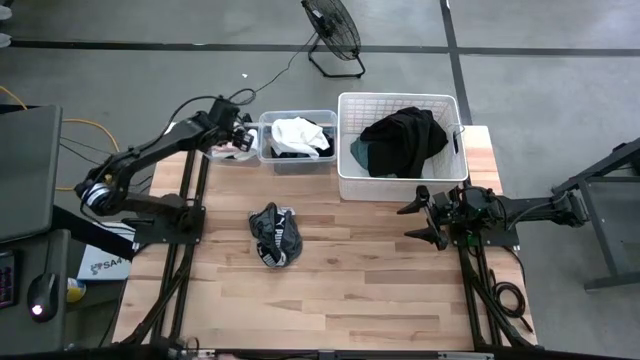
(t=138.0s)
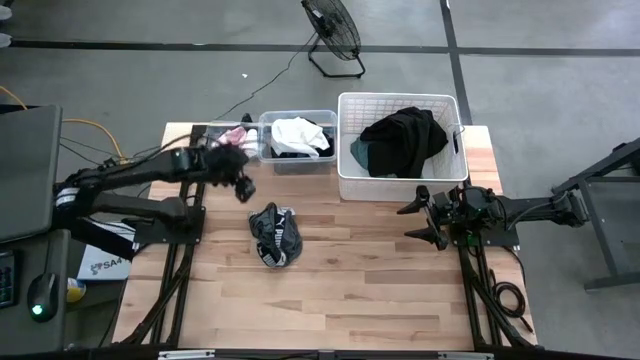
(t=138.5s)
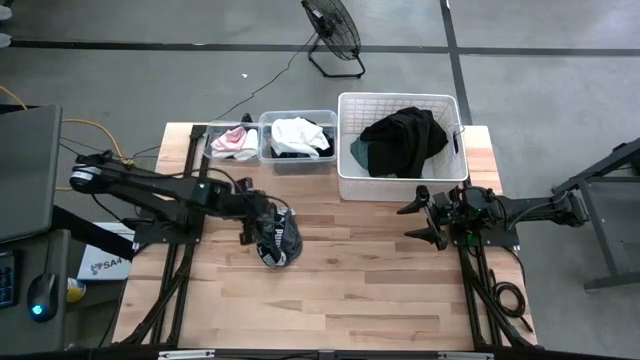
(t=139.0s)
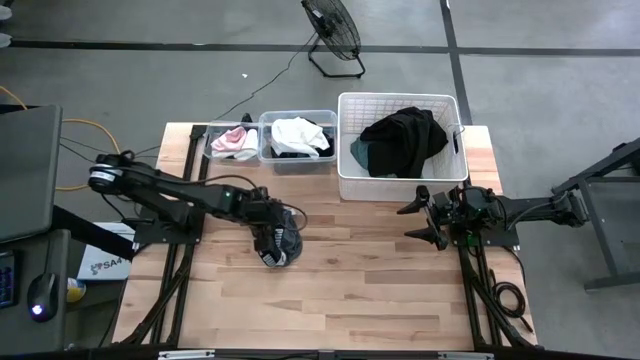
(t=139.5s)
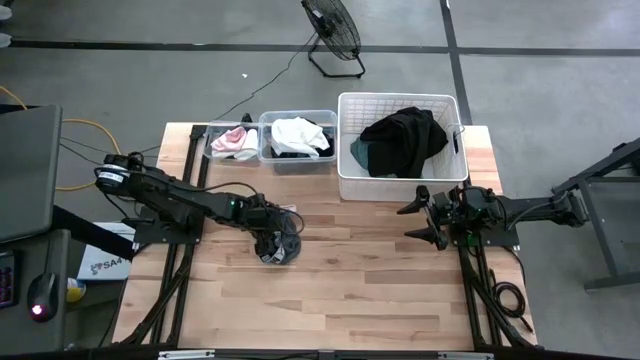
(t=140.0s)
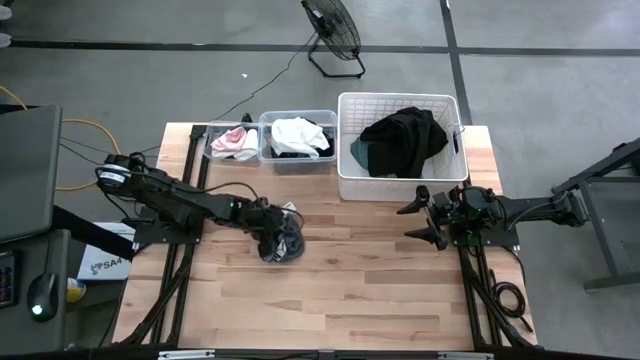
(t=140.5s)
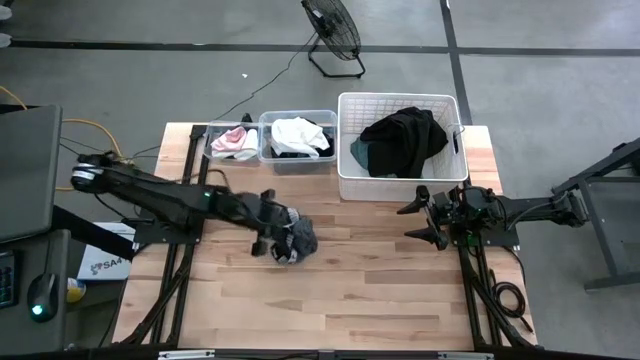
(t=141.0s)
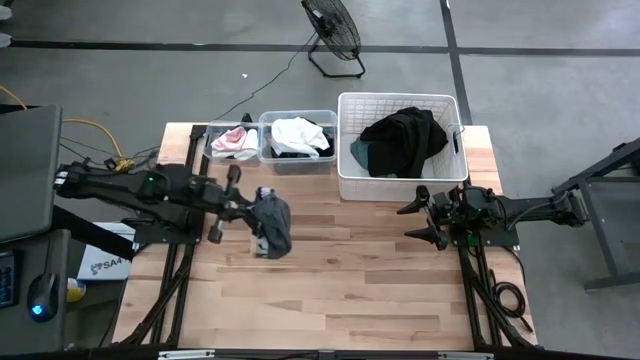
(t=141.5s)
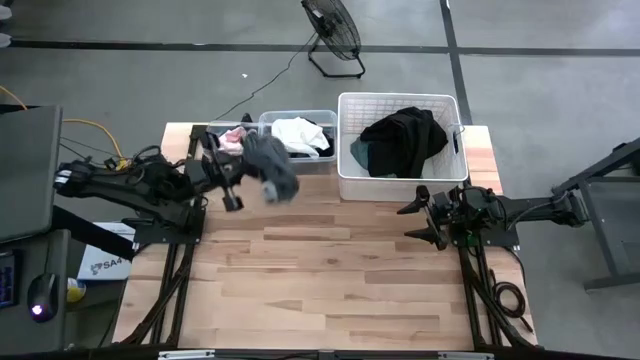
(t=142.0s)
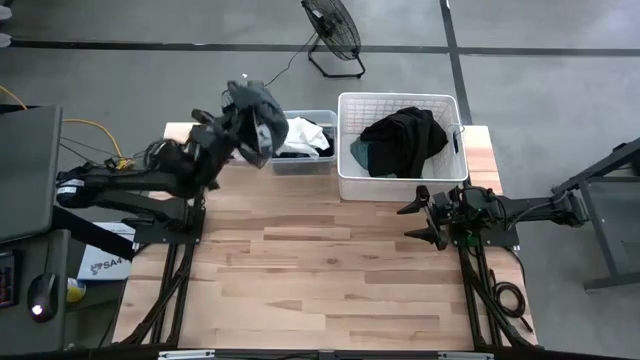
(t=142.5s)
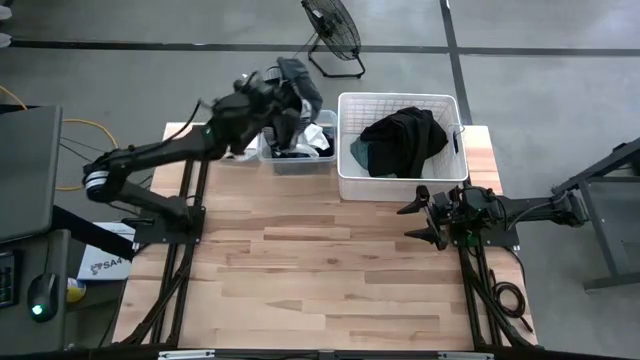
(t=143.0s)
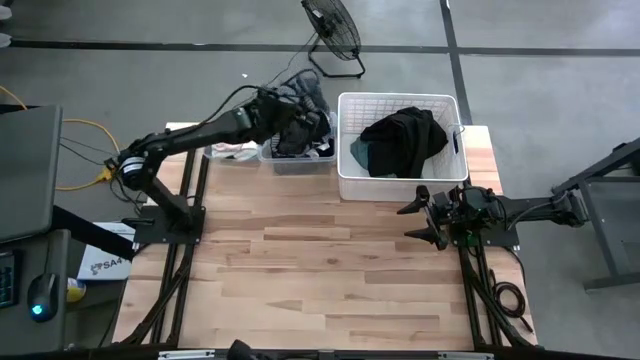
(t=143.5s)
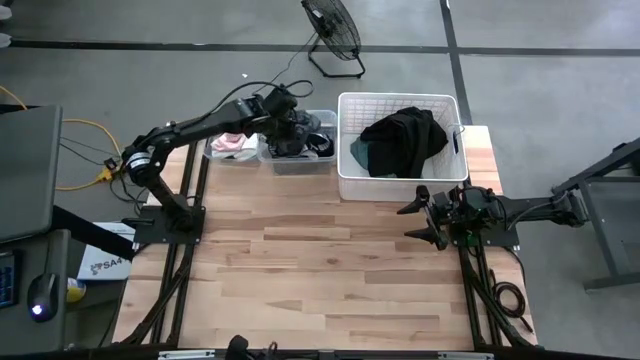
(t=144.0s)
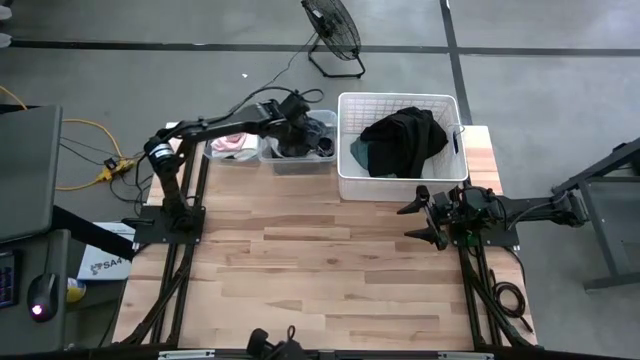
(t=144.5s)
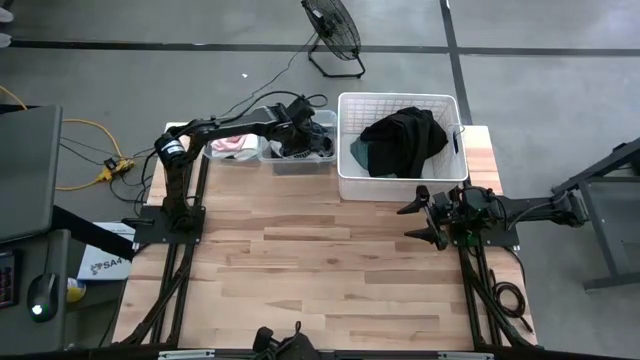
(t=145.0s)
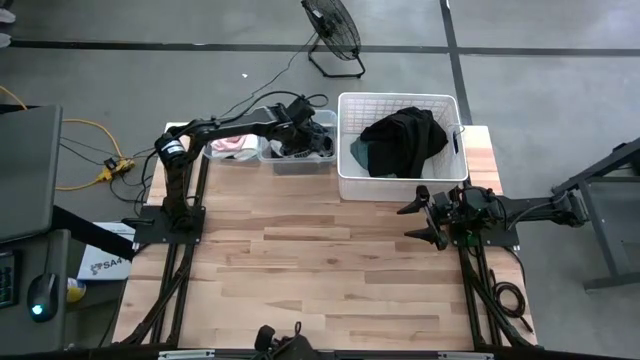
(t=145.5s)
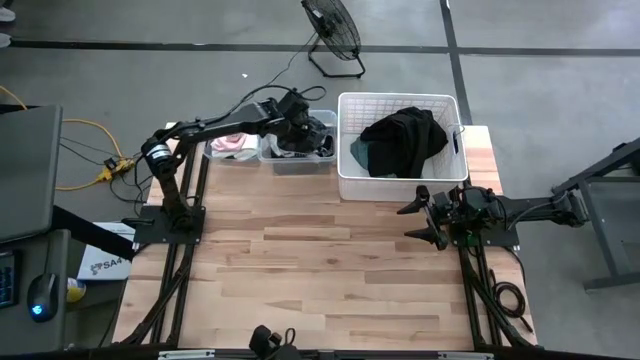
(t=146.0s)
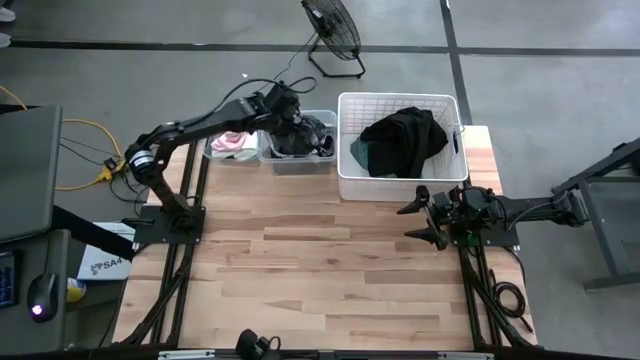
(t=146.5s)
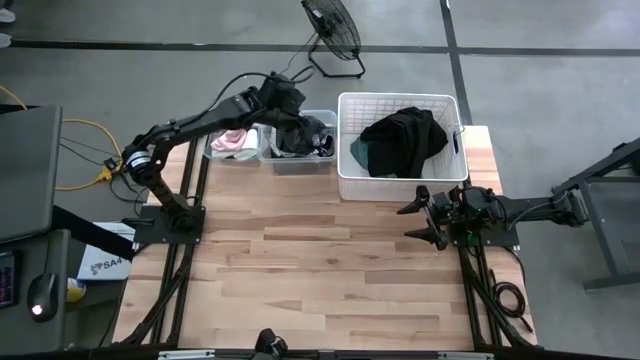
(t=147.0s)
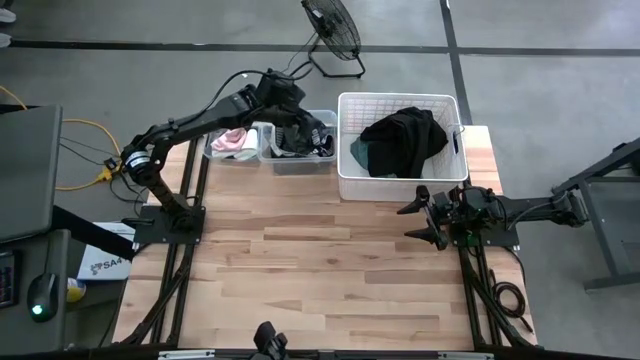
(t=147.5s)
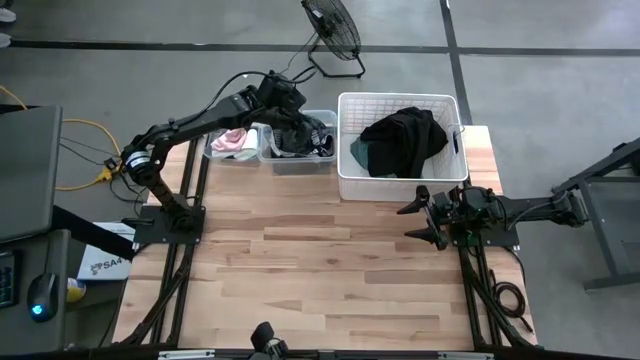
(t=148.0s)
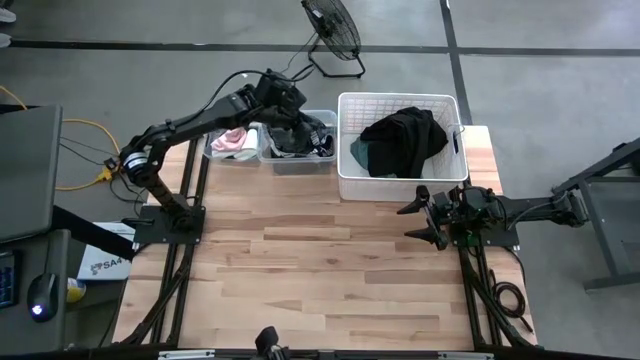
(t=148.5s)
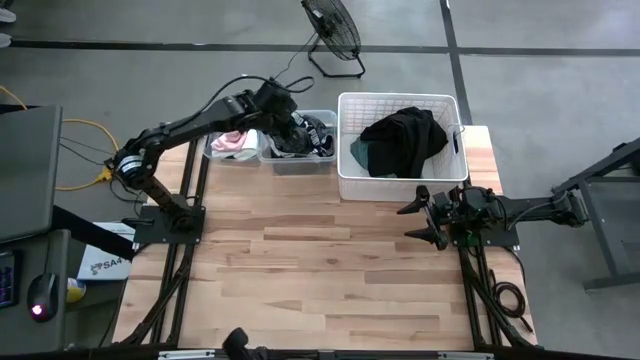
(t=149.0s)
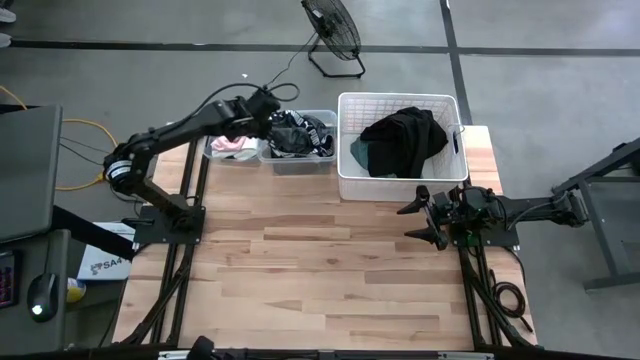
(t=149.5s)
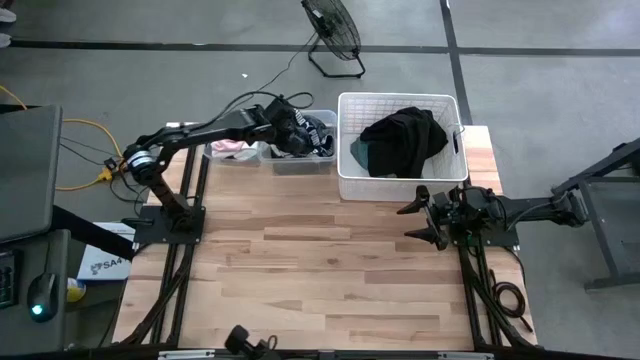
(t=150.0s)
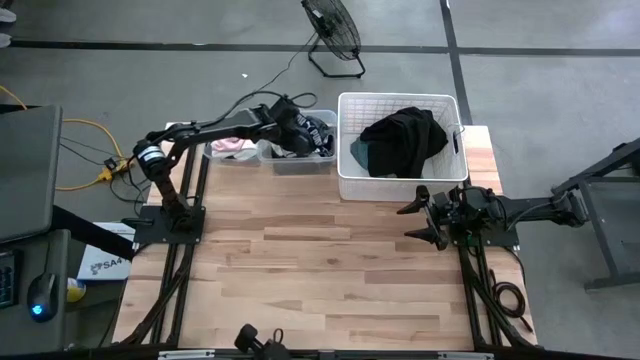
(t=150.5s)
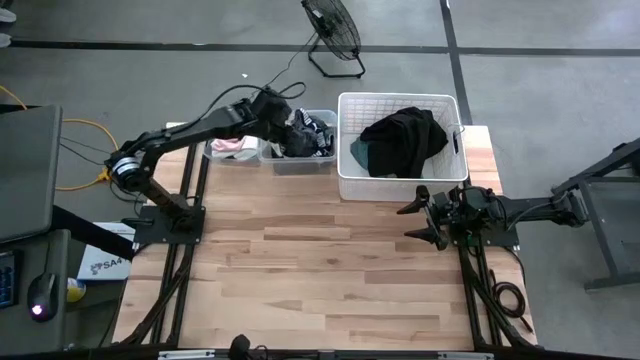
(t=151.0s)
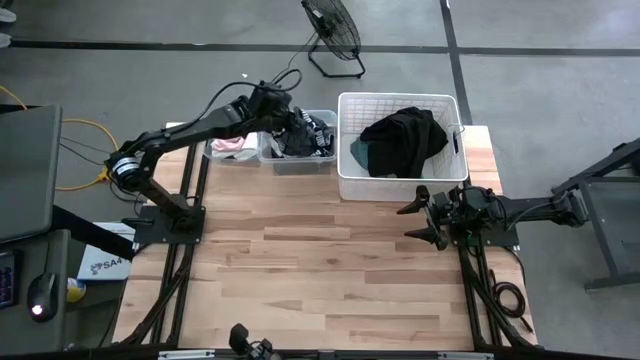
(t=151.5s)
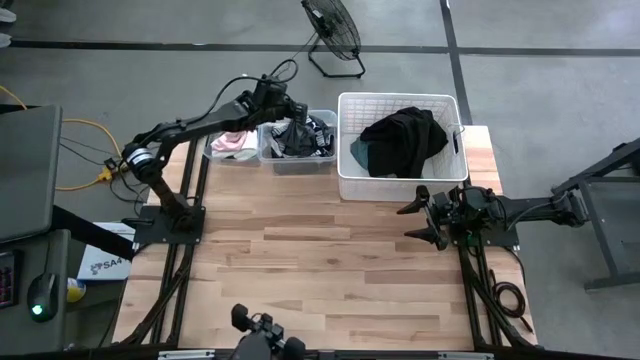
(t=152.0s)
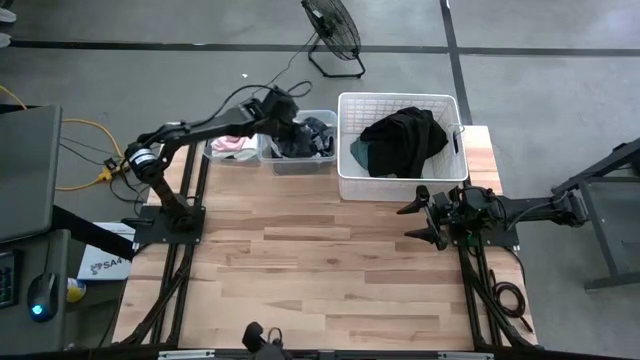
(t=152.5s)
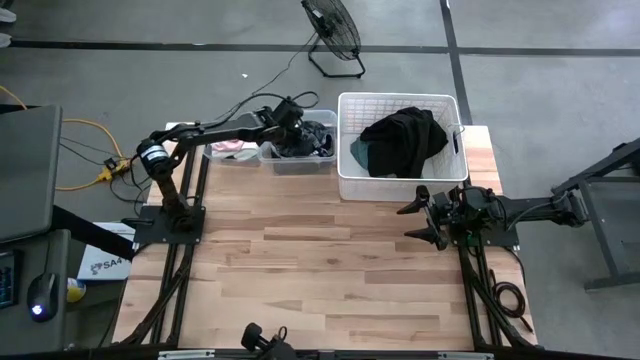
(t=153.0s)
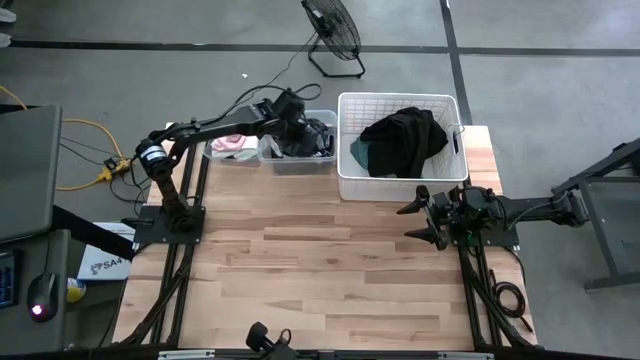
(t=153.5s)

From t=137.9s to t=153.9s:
Task: Pick & Place Cloths
Put the gray boxer into the left transparent bin

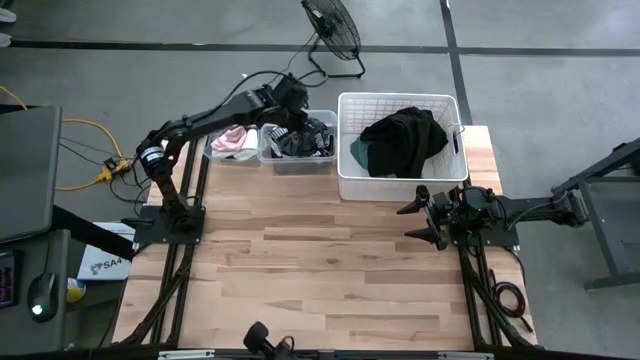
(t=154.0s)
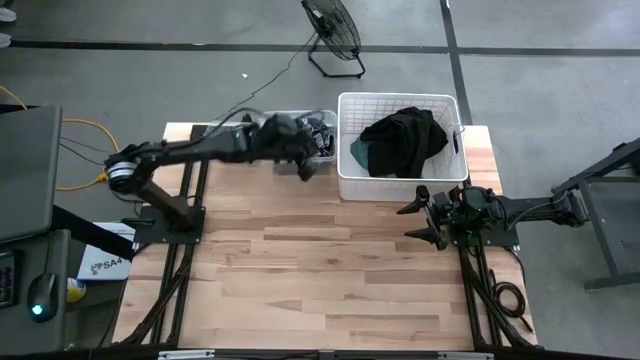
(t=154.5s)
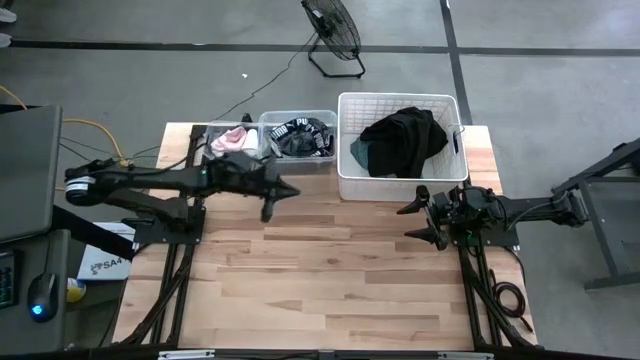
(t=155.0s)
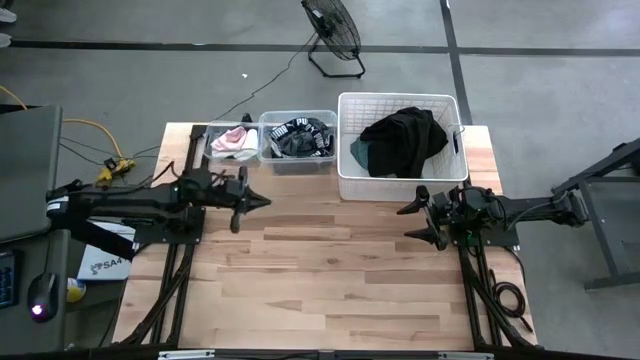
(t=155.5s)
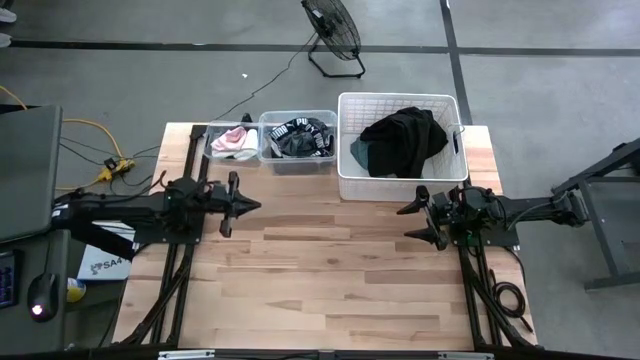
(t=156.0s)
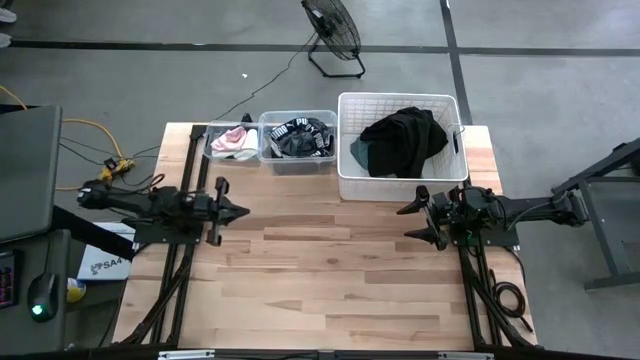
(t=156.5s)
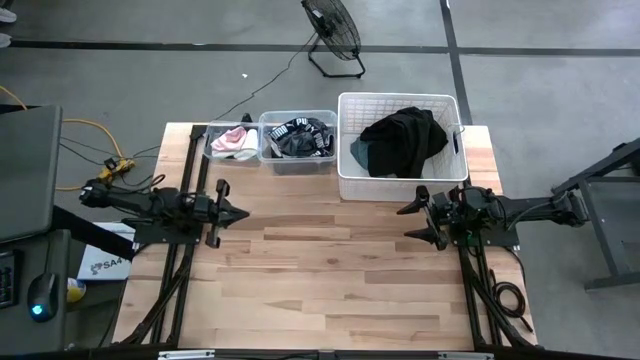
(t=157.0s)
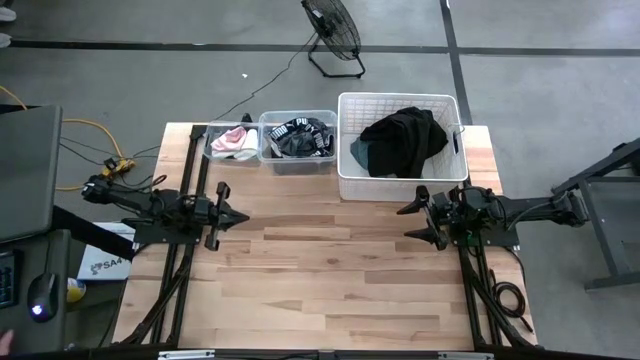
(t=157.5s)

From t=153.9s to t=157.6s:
Return to Home Position
